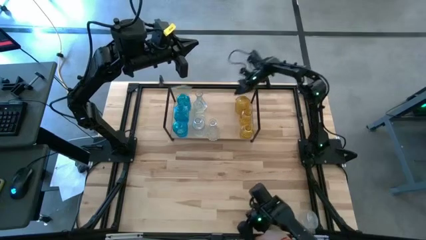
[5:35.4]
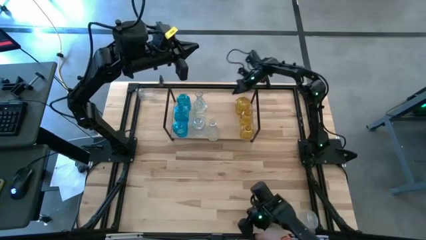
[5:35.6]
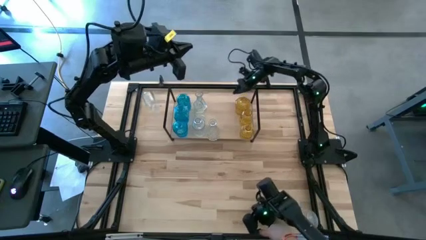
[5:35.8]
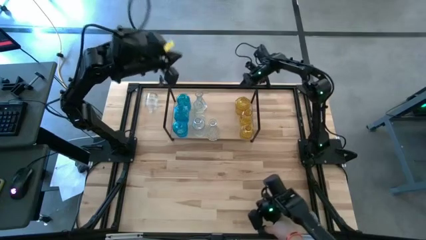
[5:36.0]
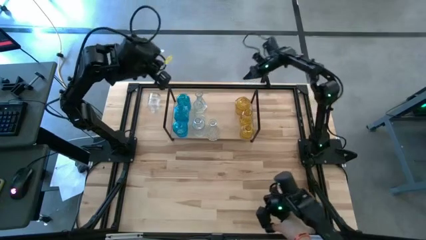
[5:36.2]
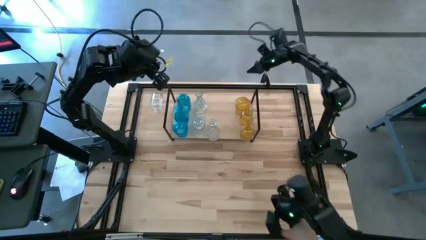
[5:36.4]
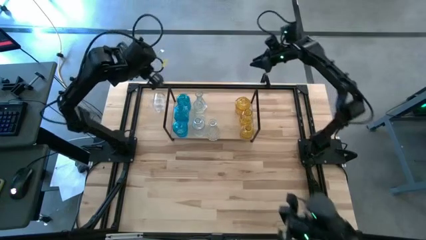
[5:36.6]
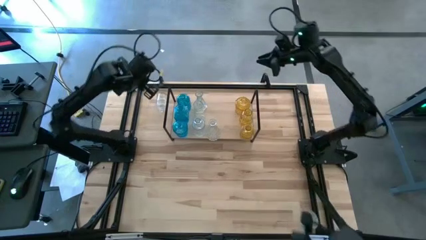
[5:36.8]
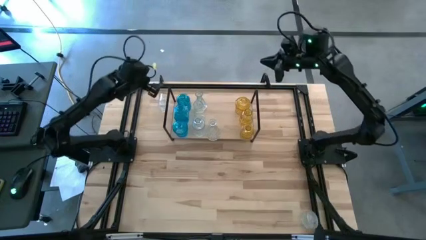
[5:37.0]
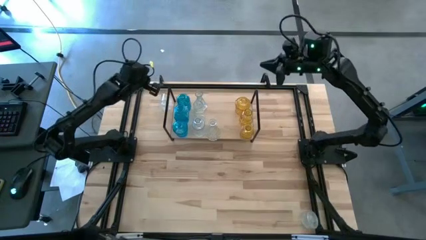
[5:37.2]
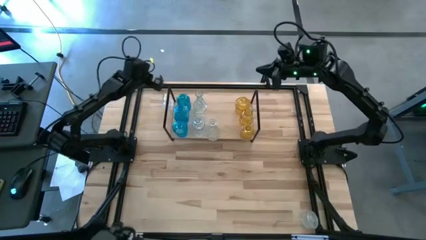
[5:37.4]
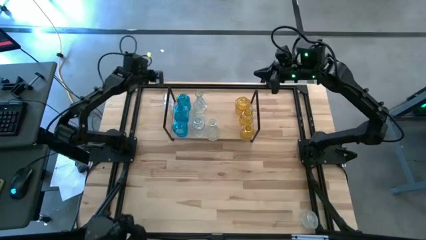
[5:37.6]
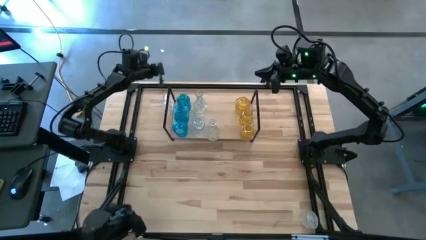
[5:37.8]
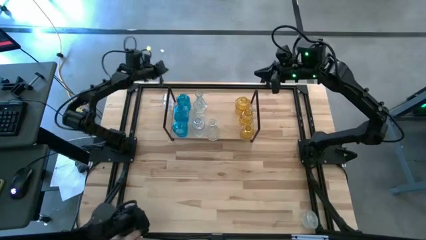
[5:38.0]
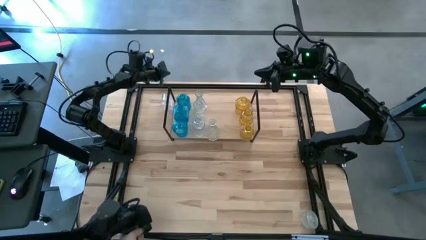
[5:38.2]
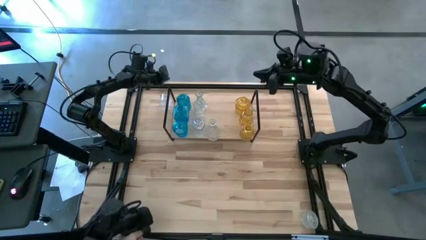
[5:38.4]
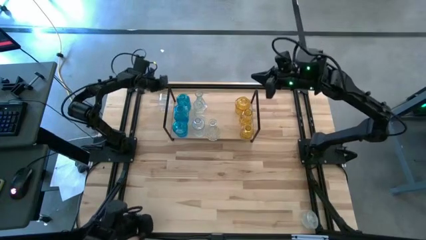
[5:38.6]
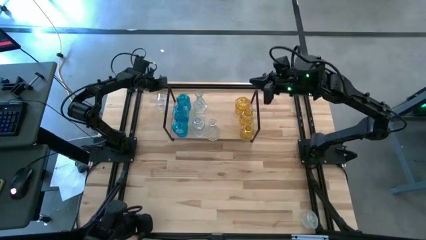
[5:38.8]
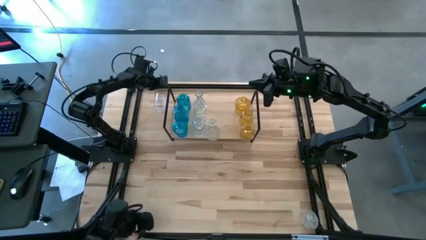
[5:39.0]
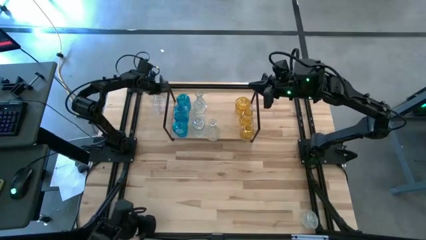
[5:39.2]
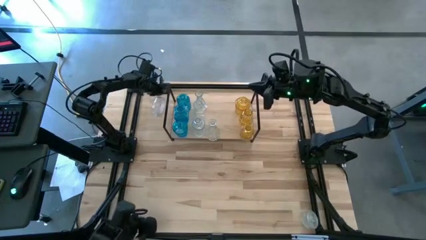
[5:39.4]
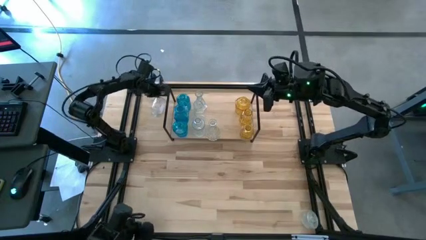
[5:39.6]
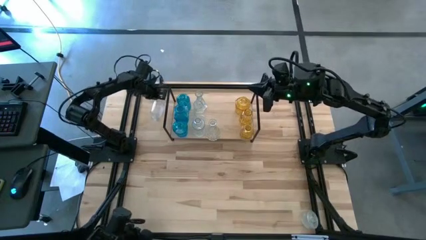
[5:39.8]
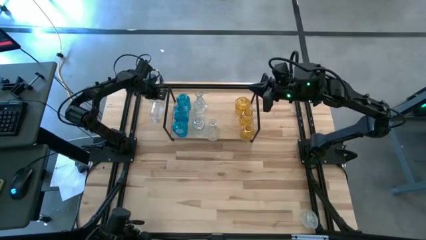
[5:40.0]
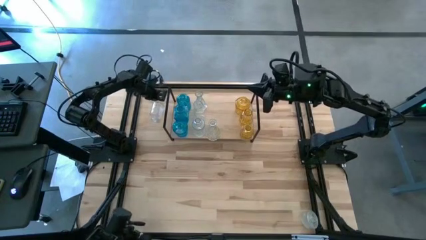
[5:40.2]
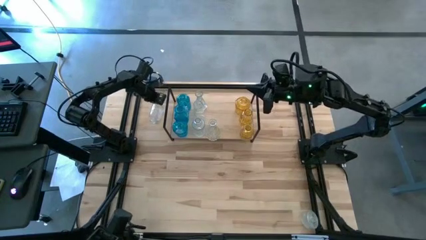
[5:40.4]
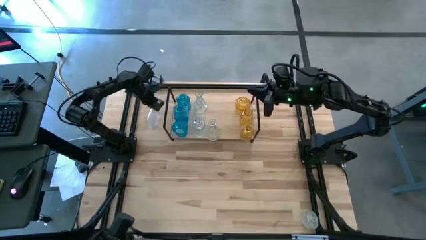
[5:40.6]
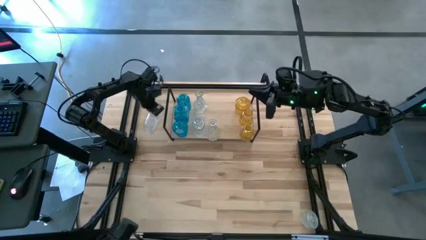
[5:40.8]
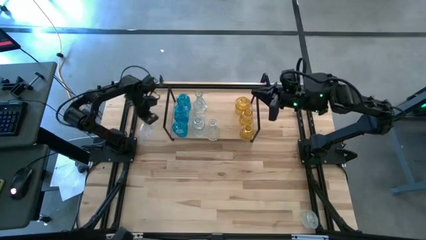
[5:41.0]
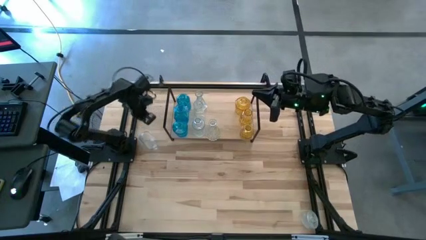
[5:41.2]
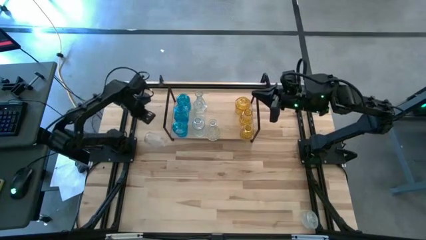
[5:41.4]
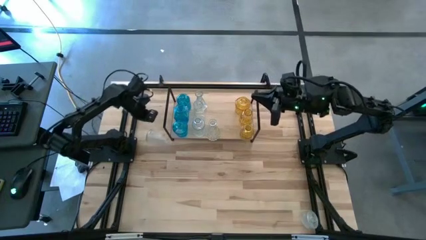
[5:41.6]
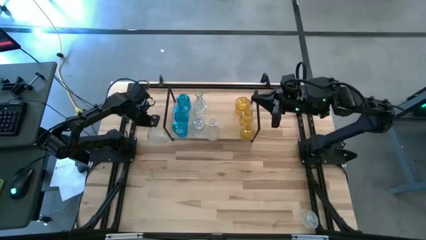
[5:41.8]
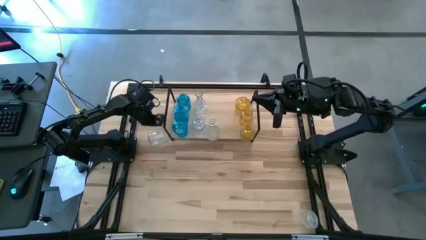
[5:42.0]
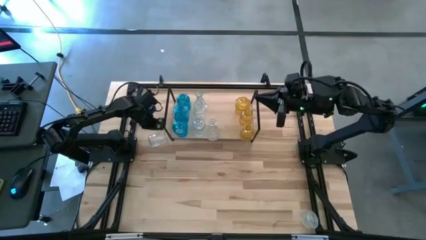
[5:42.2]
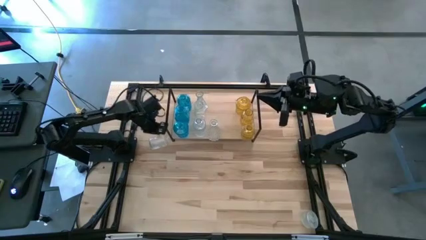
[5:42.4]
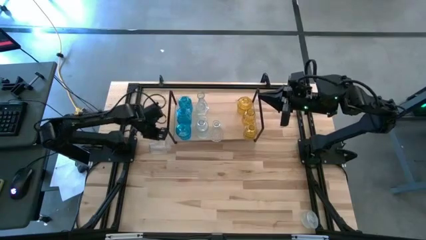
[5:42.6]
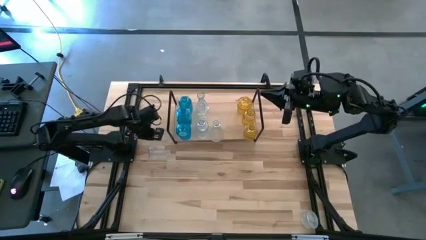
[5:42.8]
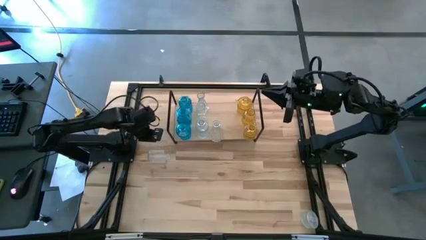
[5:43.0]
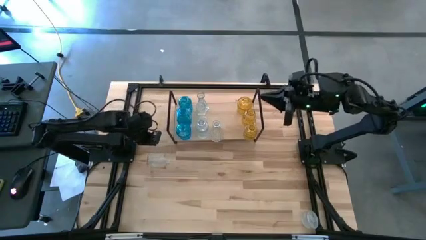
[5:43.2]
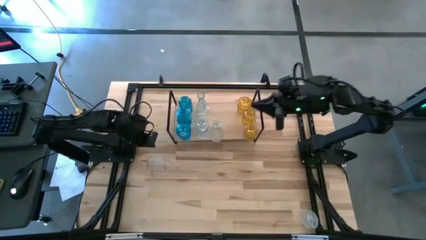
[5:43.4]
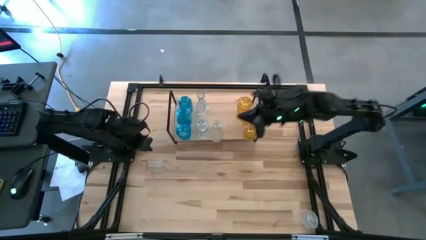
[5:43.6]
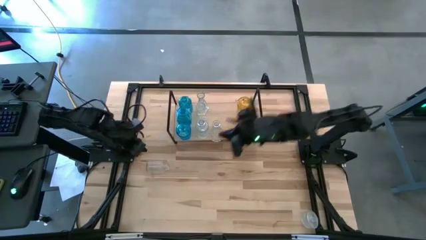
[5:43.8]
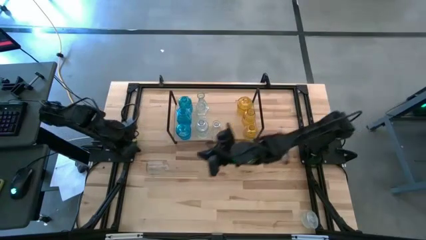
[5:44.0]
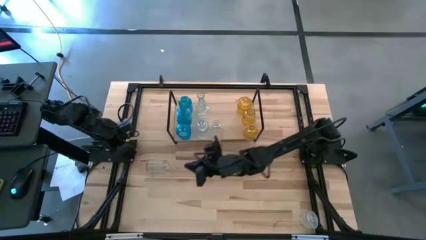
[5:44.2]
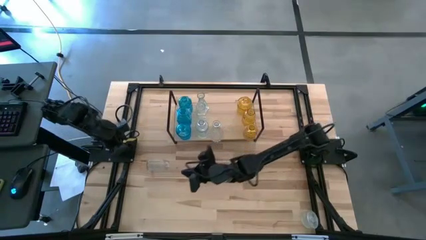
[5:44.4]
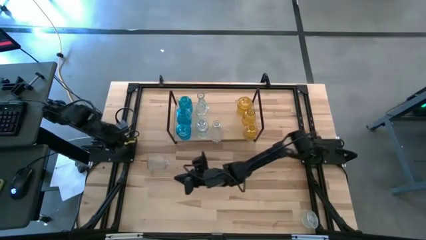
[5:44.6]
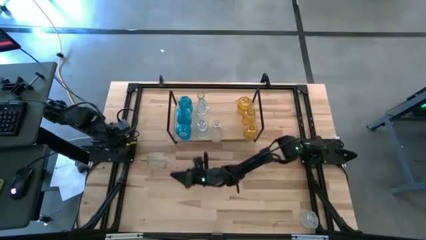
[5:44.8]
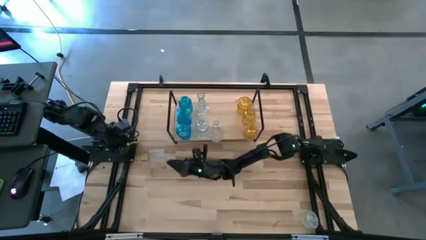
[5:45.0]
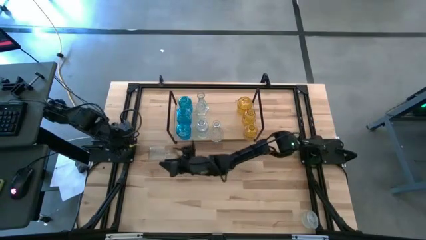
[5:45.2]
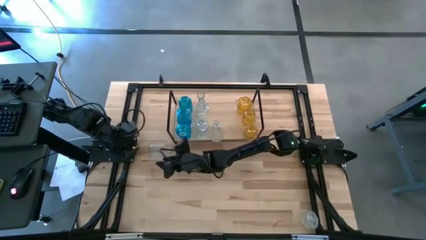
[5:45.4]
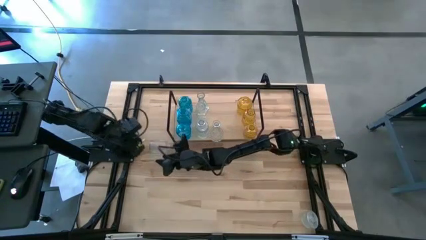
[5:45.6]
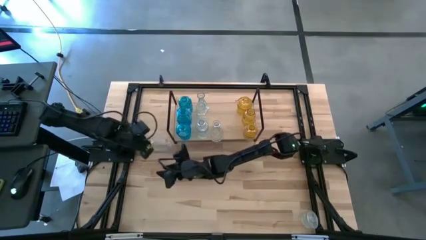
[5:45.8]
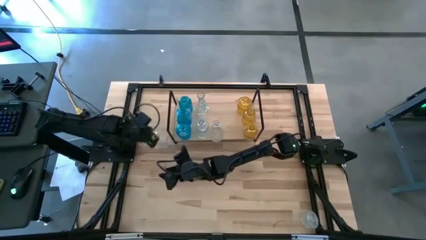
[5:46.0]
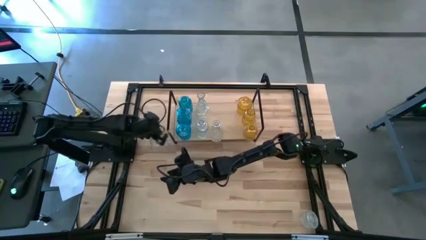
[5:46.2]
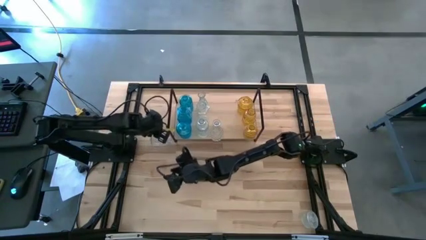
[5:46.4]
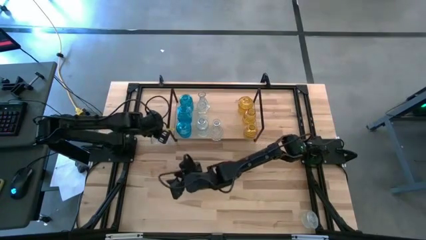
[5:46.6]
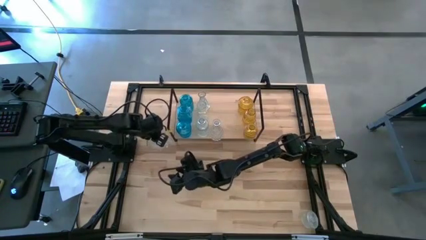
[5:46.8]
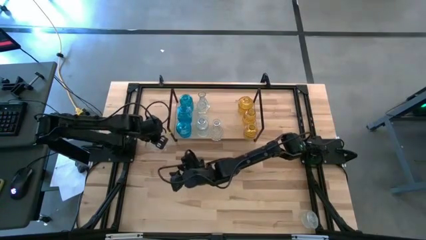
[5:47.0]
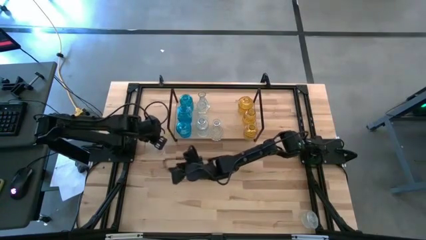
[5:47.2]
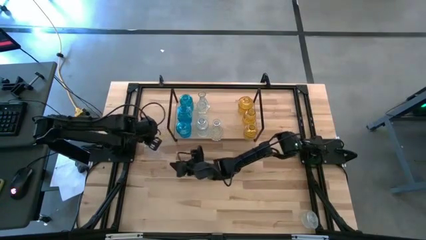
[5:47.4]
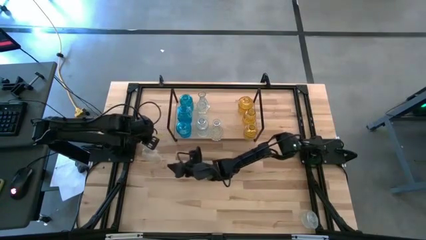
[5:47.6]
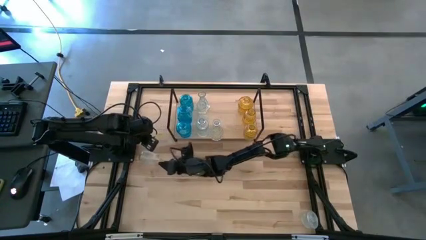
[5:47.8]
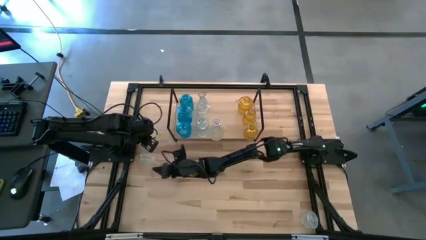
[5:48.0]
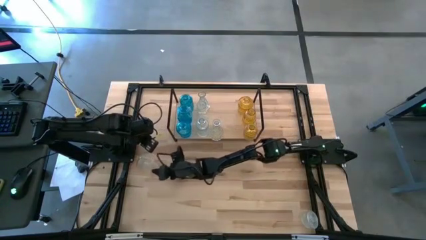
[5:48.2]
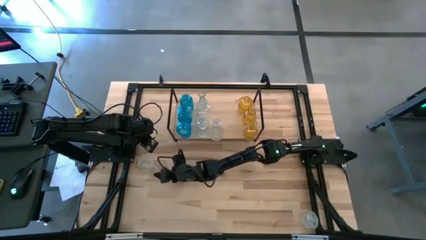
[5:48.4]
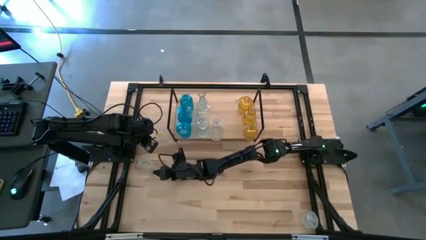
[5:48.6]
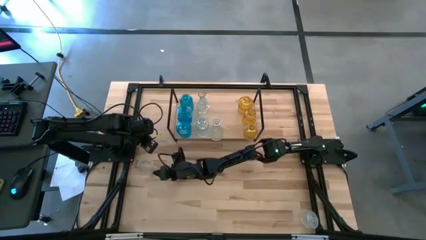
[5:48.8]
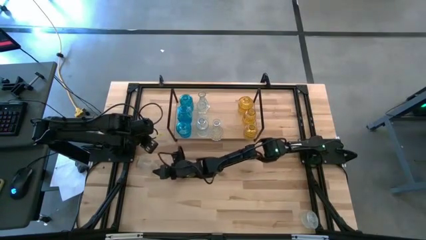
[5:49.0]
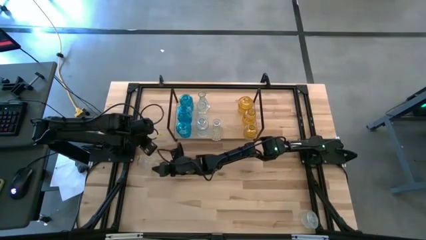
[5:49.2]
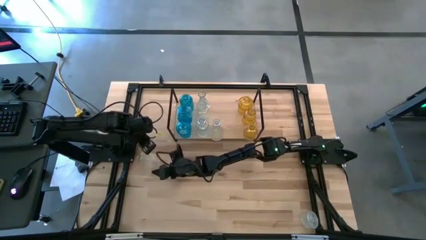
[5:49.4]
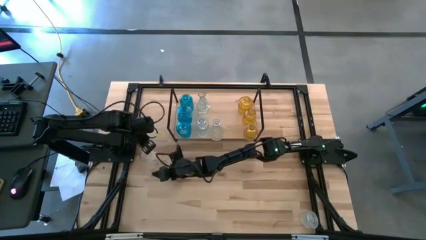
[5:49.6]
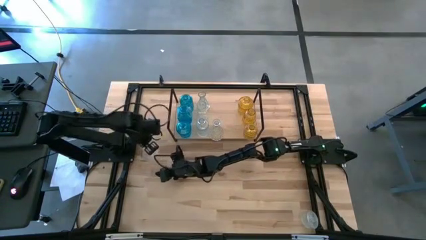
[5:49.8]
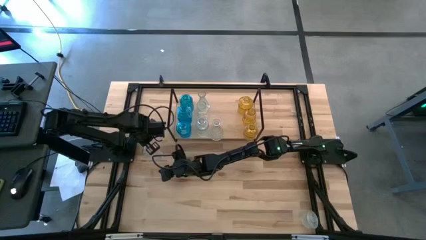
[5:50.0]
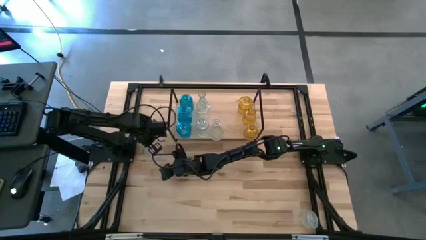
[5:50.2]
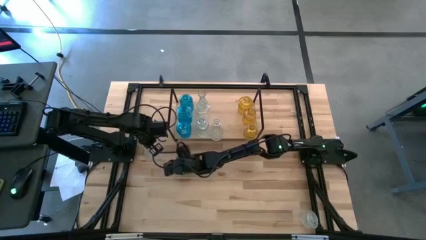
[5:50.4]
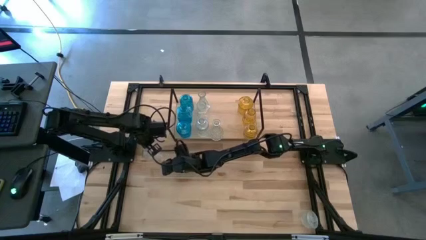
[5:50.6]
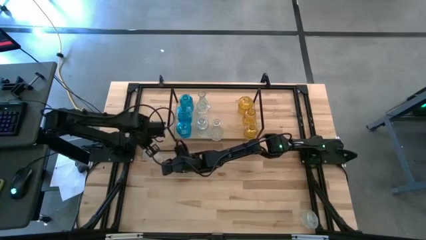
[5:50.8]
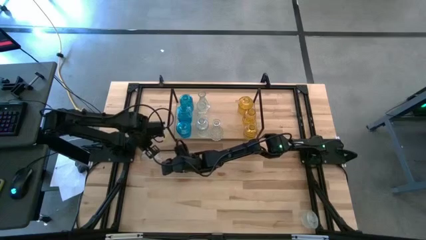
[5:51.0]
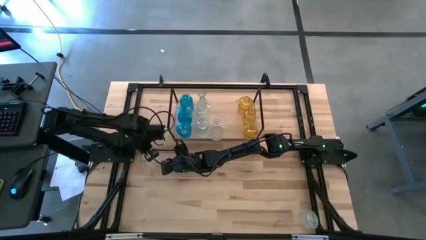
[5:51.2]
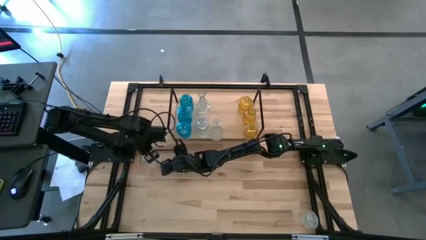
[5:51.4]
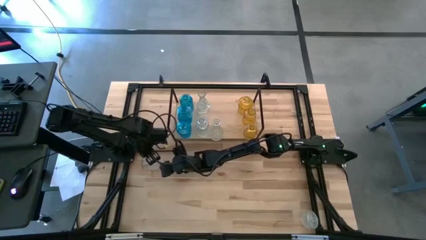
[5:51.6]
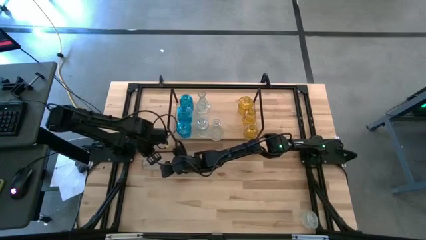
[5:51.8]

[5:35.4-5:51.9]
Task: sort vases onto shelf
Put the transparent vase on the shelf aligned with the other transparent vase
